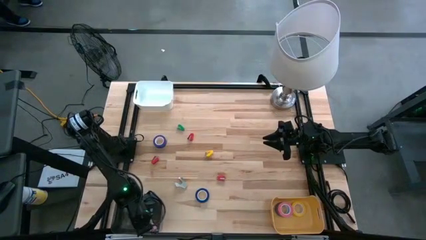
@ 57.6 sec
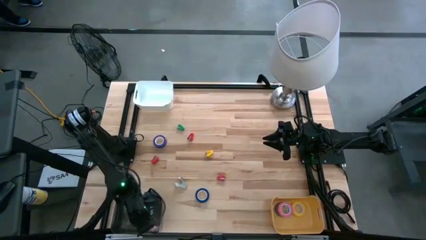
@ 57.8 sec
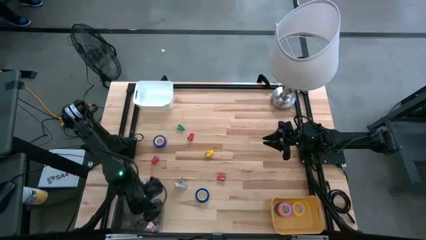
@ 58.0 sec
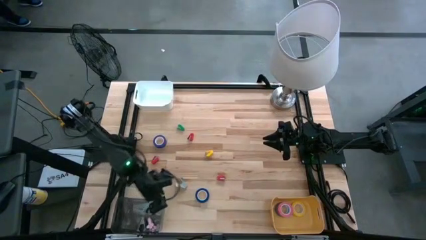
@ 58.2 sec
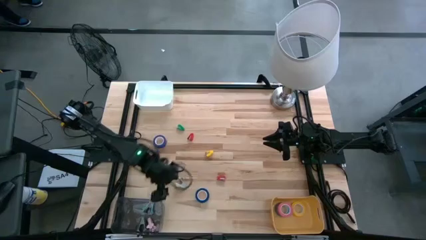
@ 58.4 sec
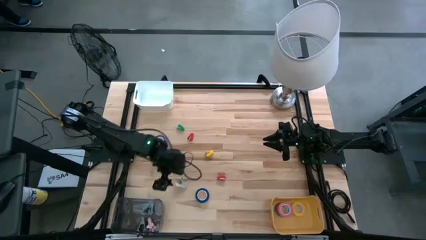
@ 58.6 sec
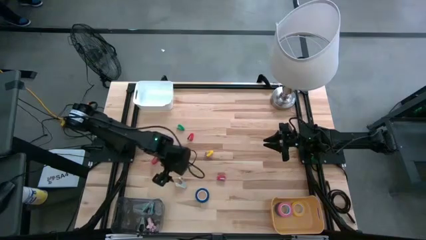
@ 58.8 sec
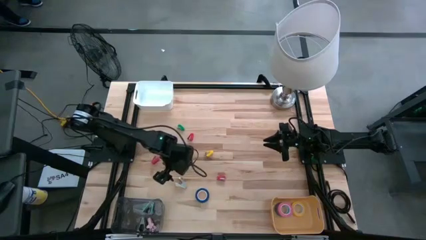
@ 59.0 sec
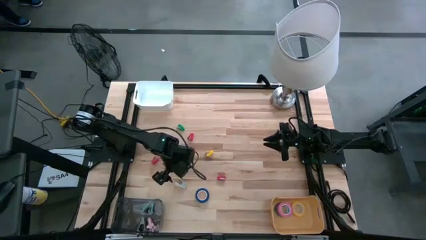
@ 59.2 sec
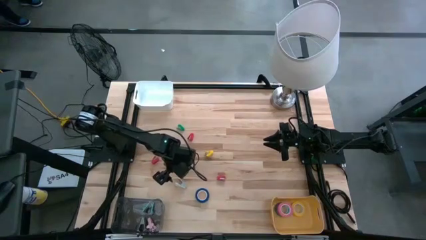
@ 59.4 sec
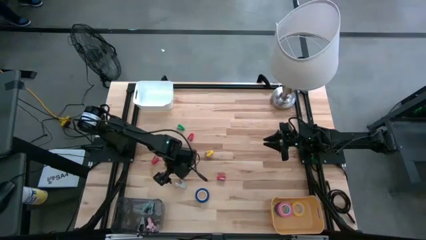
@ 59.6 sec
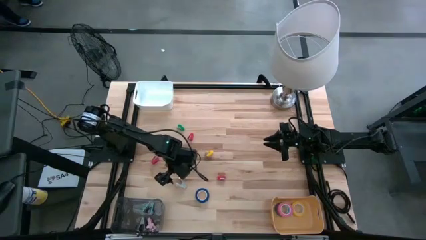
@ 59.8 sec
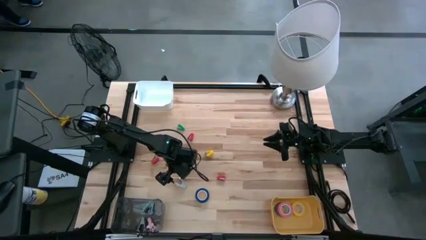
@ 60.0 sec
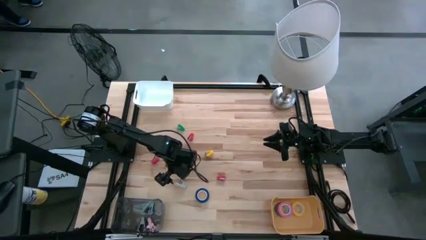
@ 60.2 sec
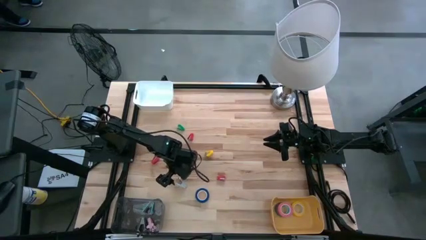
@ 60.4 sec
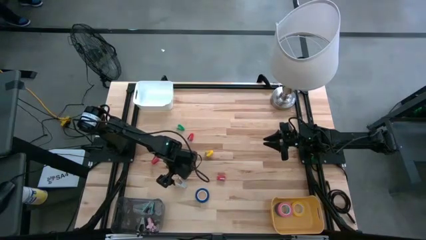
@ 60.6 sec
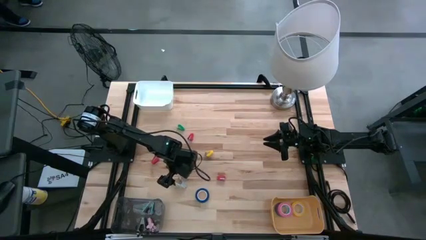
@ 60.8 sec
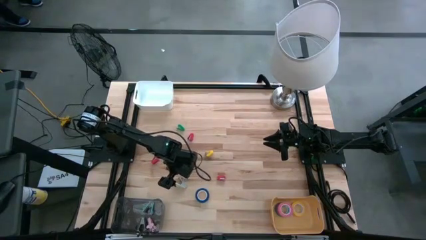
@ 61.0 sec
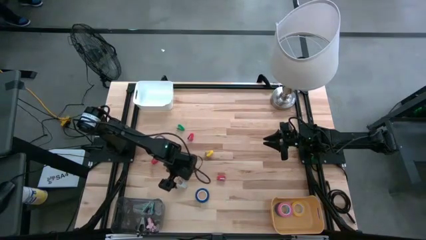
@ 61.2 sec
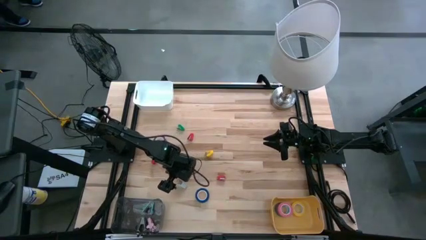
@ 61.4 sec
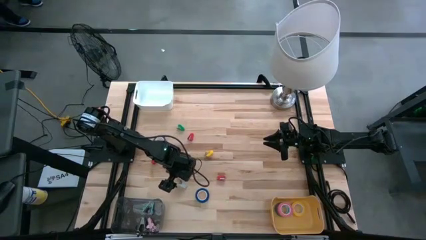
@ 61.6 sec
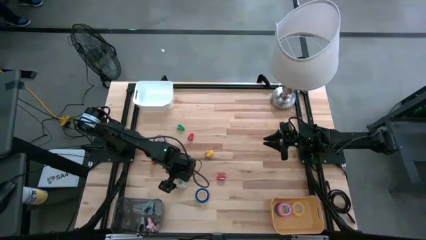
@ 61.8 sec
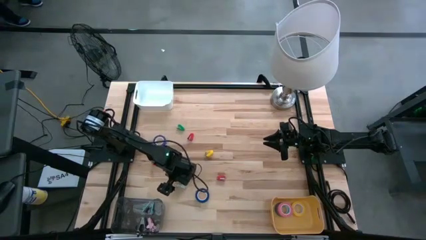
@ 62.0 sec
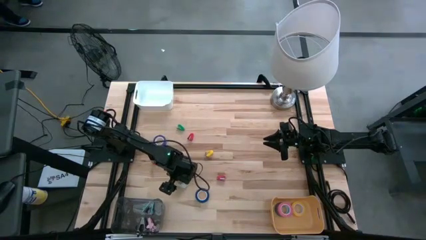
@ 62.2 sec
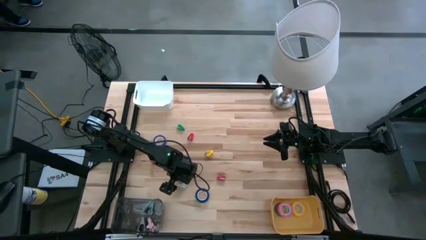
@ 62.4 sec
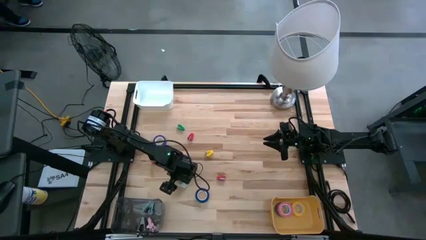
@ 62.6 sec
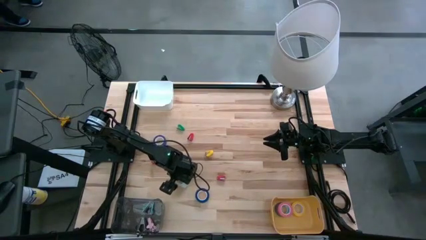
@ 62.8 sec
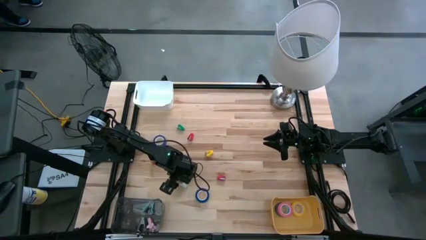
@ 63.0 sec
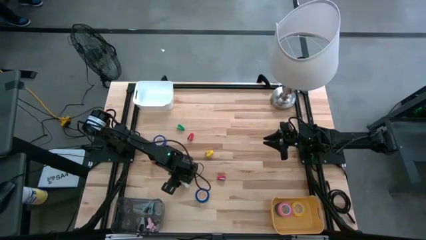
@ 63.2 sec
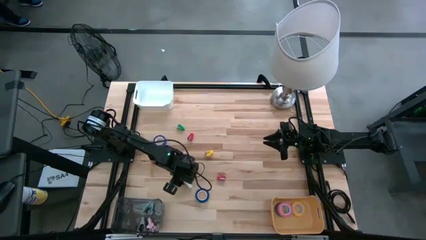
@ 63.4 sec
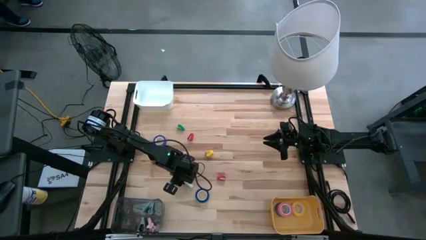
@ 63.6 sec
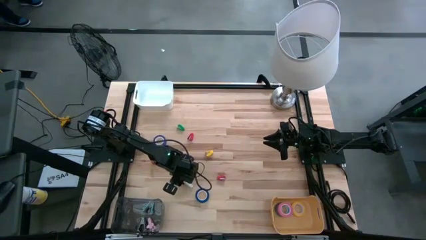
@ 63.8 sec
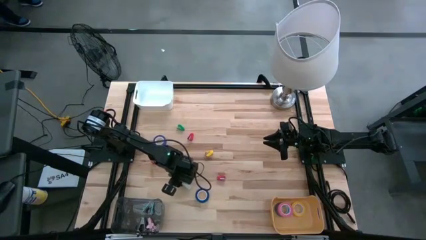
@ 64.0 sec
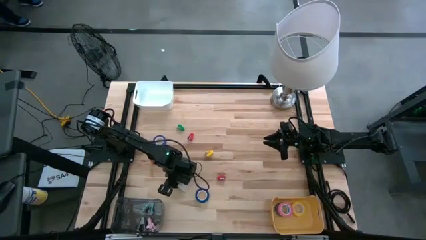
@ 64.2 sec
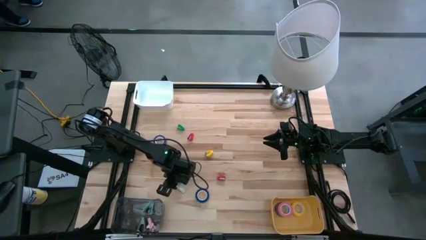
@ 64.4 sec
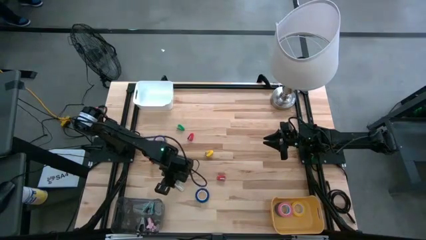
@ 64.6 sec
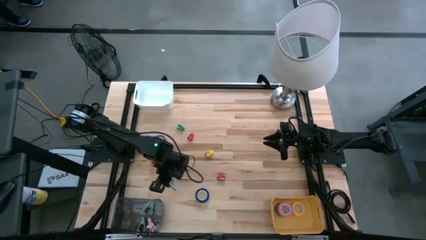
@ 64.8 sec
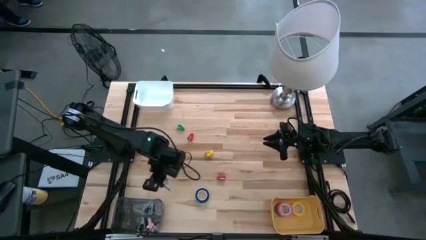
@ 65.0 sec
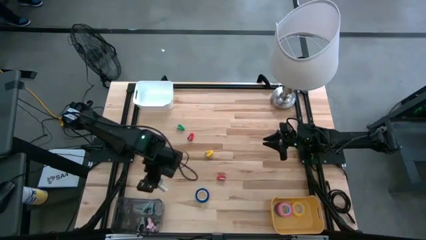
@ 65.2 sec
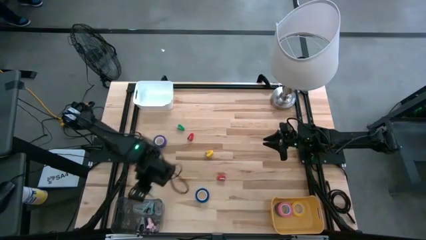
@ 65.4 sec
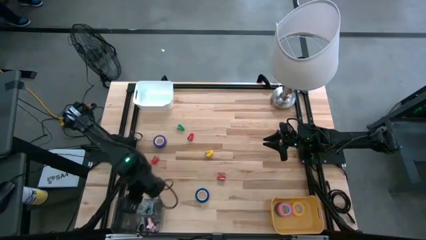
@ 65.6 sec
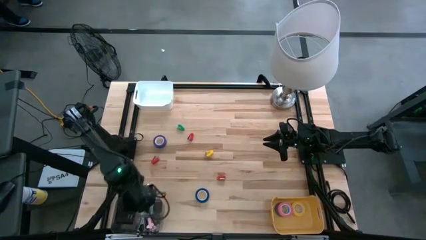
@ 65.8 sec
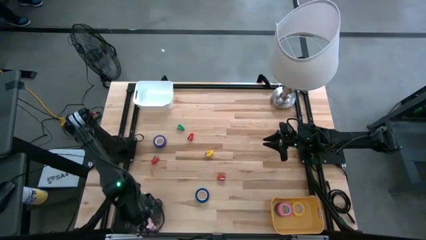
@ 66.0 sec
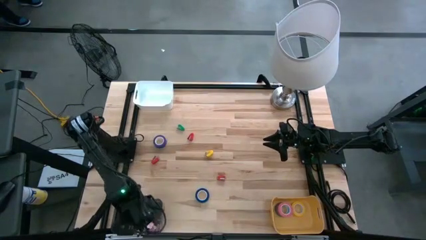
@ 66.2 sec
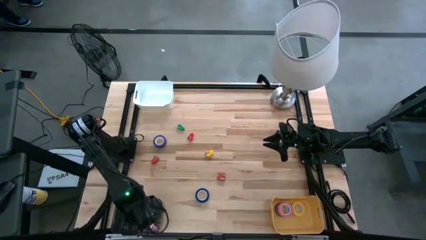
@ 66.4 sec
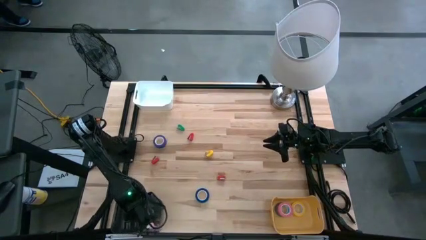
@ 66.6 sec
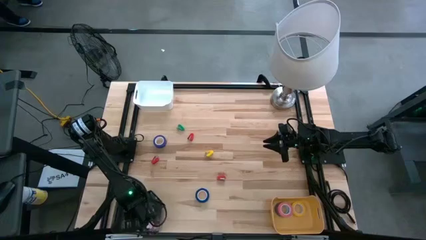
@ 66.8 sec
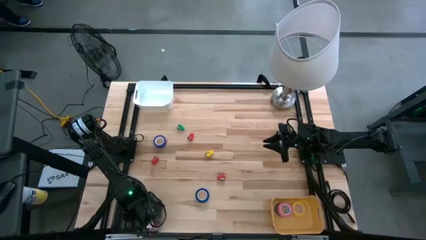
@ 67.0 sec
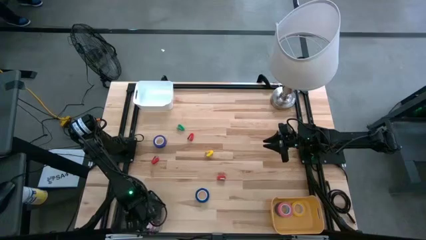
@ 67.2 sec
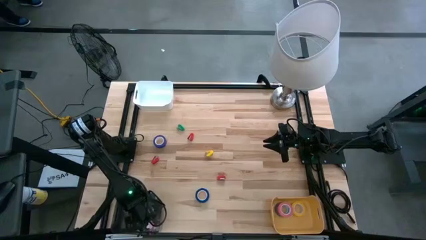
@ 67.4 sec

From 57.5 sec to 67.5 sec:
Task: Pick and place Stapler, Stapler remover, tape
Put the gray staple remover into the black bin
